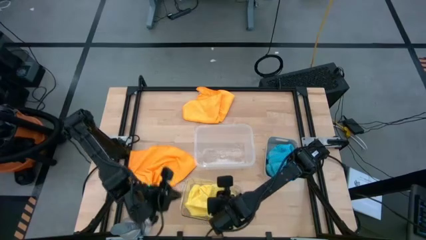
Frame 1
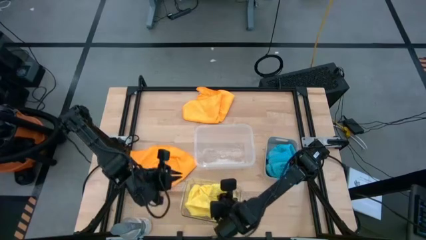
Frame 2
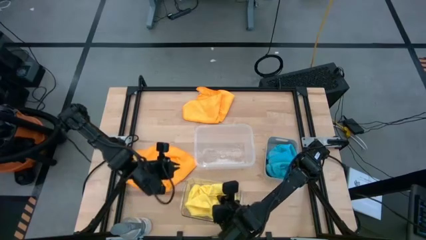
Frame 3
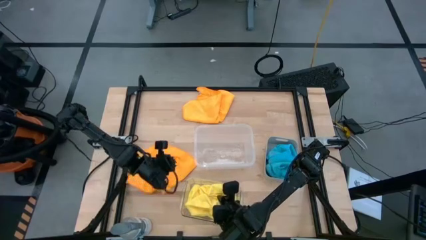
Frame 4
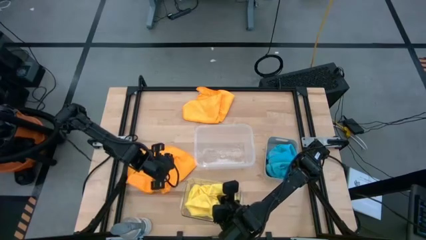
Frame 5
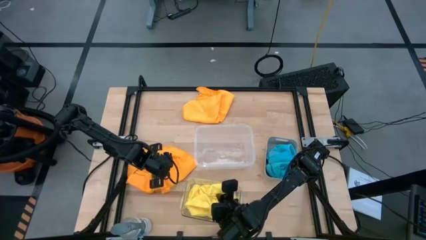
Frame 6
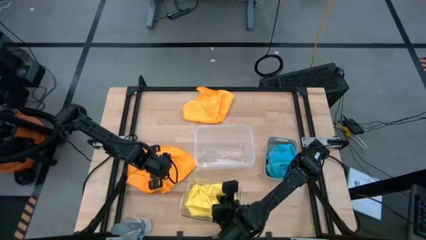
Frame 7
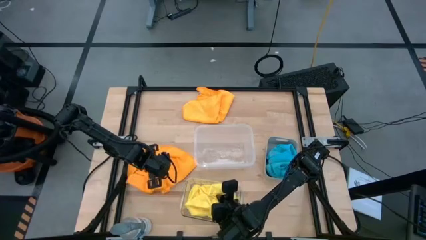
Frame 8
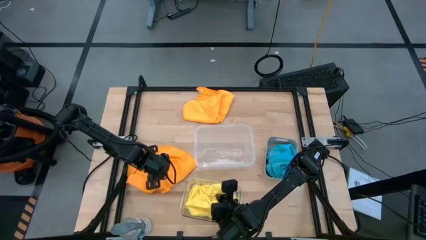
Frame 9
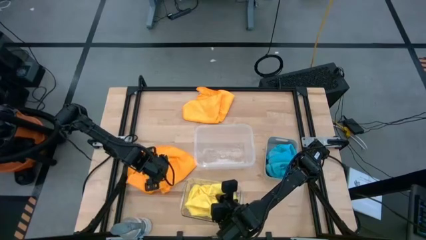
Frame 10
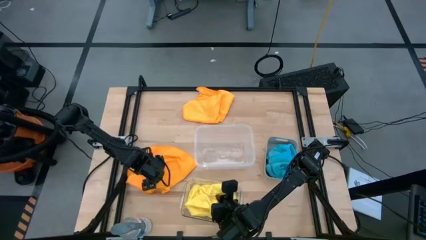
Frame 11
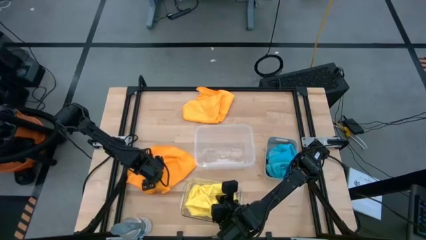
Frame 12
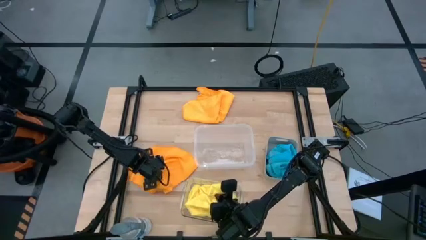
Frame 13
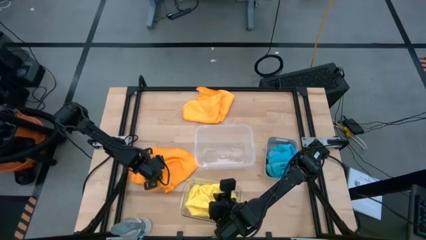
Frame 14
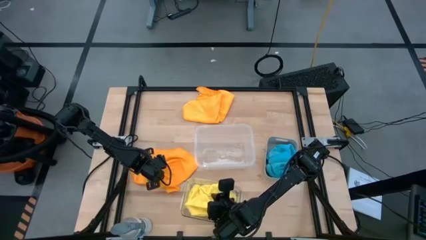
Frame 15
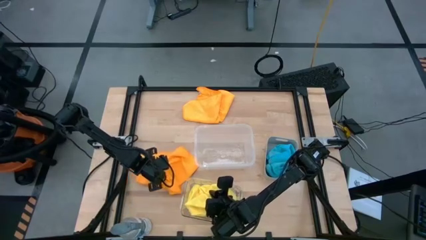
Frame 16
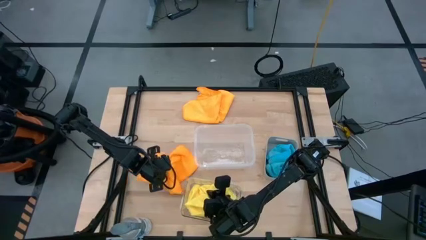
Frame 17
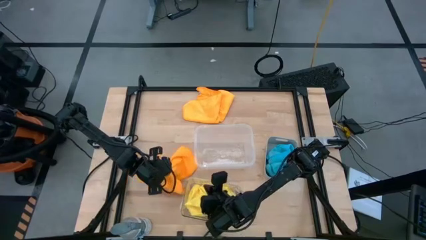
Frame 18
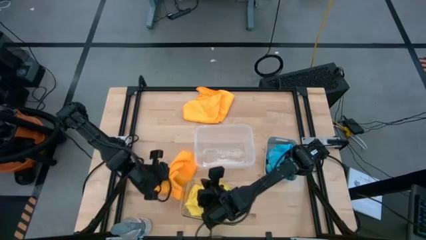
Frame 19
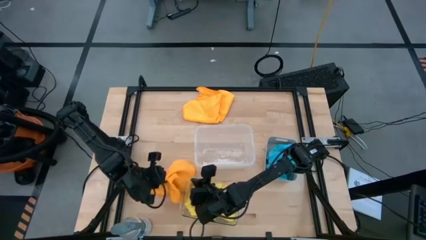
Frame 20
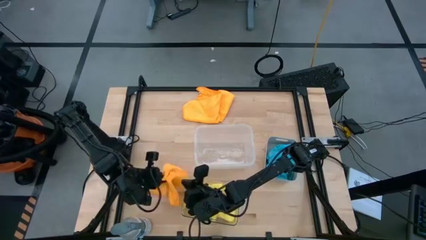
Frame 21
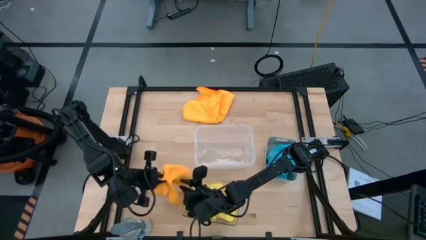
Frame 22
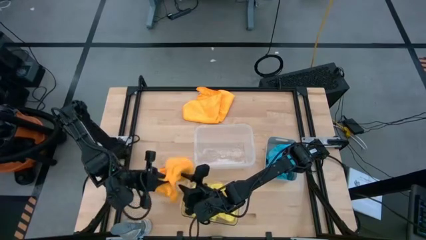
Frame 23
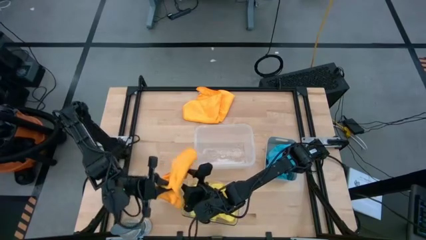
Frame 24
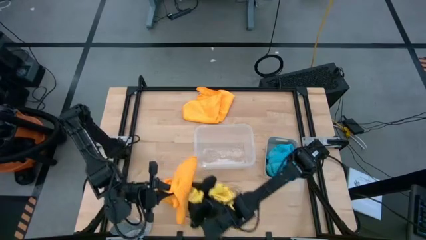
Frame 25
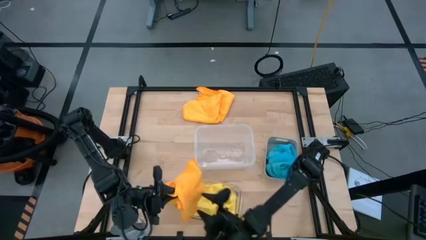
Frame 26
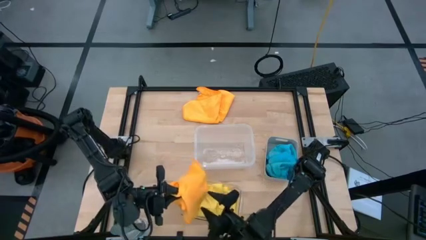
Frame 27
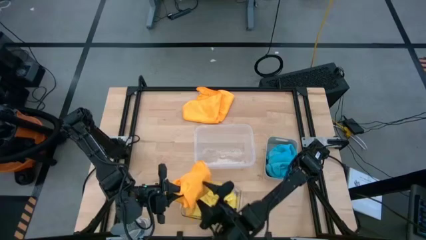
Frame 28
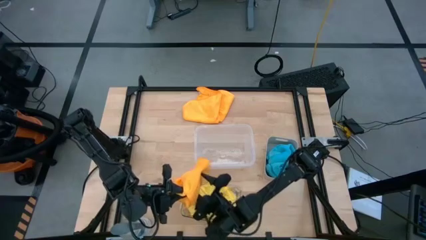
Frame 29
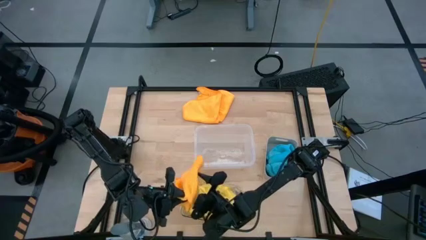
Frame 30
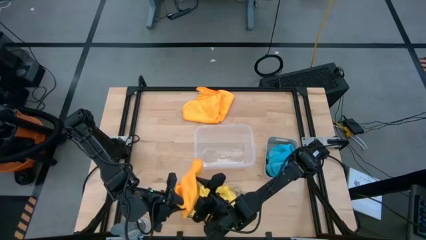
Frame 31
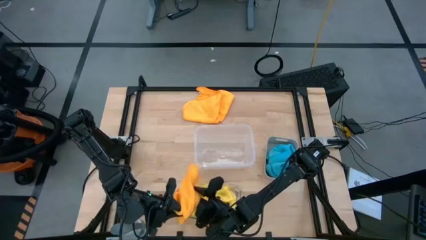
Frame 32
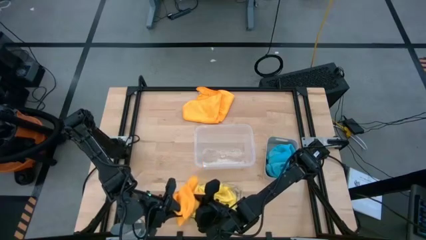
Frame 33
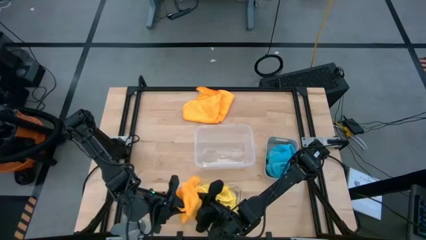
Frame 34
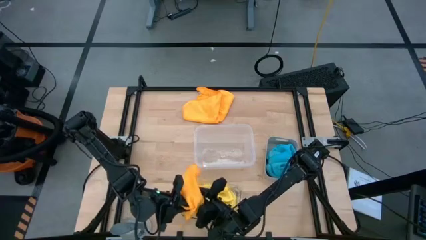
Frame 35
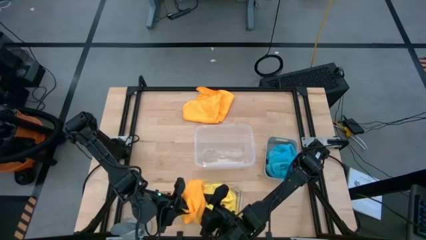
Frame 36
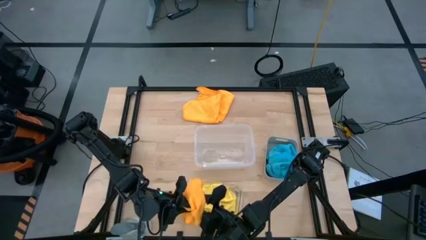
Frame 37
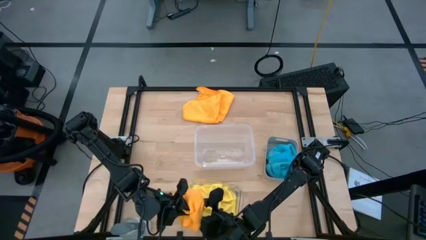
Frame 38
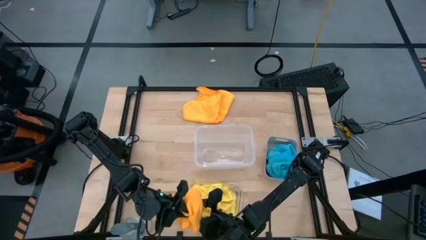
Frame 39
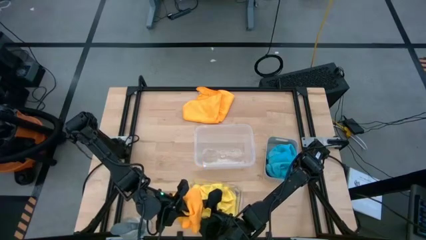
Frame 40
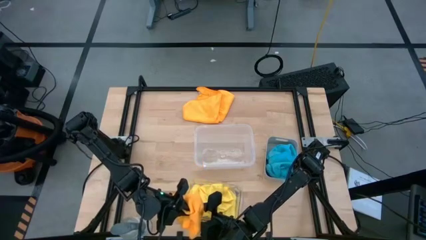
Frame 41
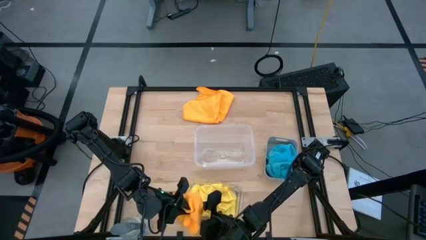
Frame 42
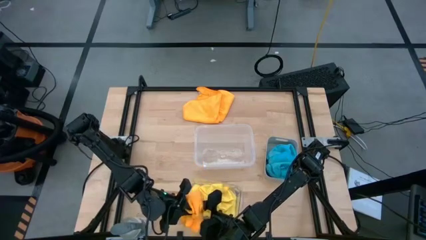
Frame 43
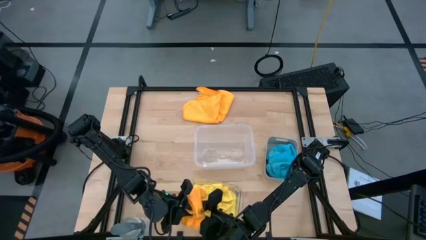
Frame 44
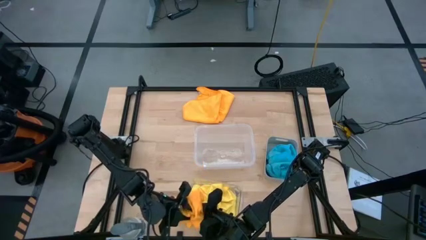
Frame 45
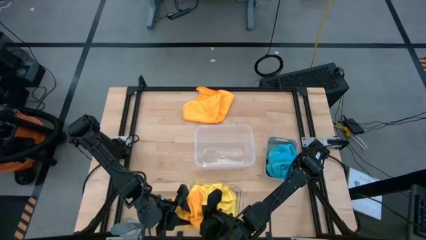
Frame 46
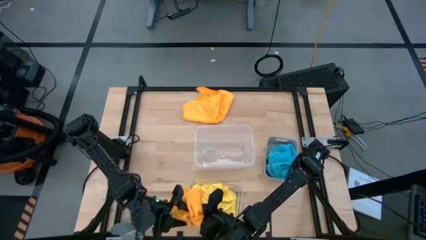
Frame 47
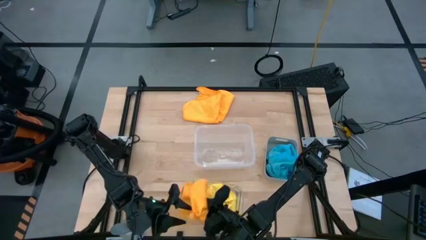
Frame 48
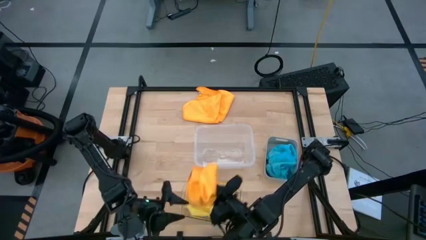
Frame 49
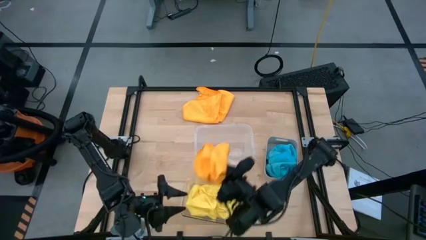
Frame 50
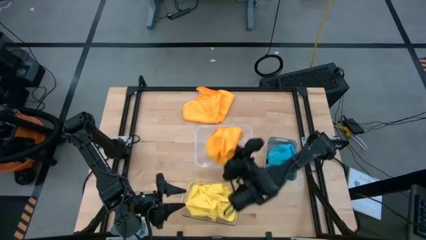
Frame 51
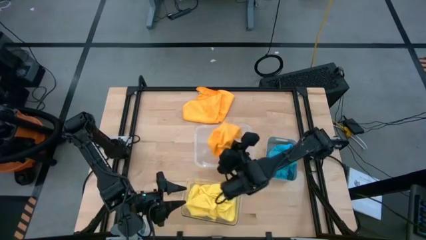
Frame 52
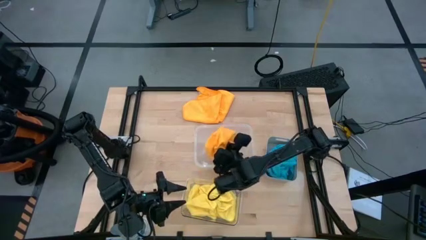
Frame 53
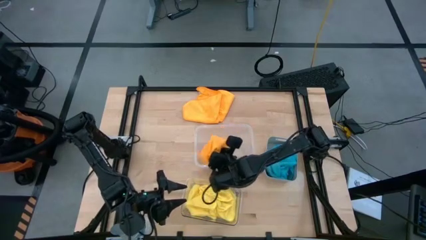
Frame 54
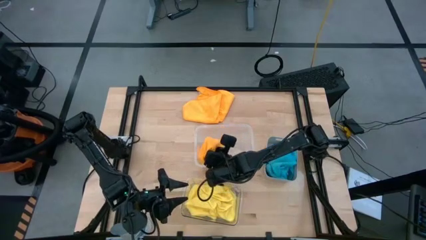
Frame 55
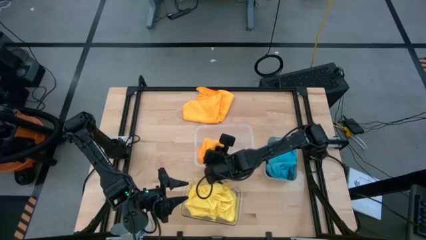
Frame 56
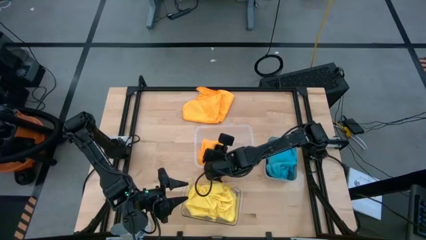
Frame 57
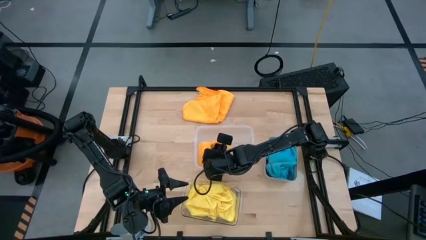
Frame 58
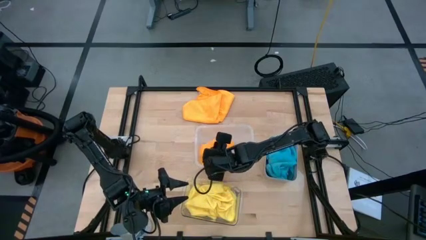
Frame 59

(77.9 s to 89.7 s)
Task: Sort microfiber towel by color & place in baskets
Put the bottom orange microfiber cloth into the white transparent bin

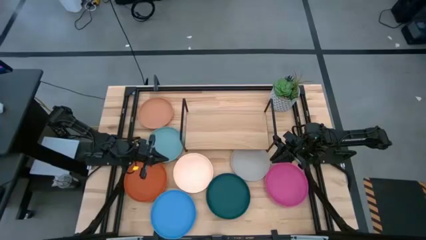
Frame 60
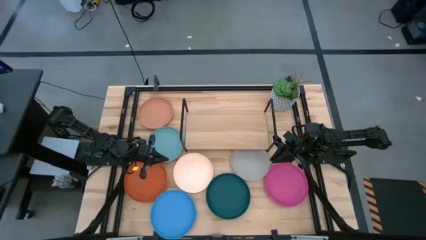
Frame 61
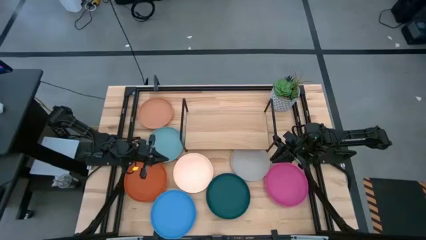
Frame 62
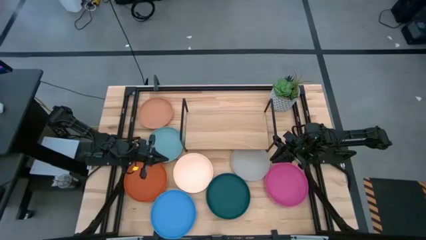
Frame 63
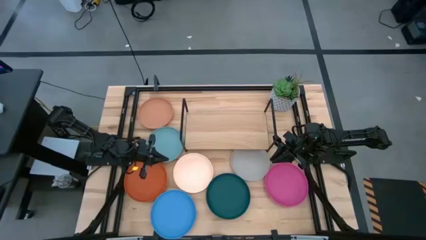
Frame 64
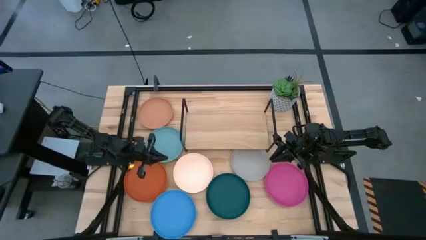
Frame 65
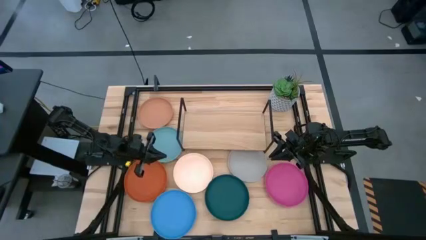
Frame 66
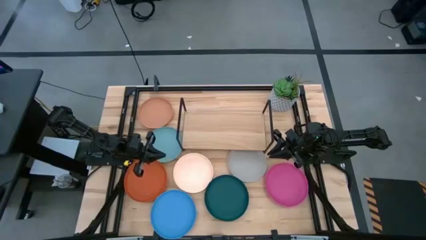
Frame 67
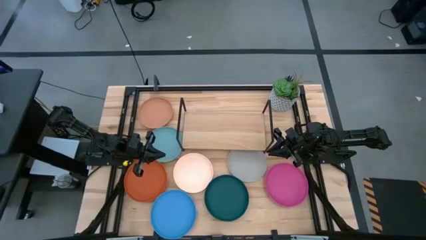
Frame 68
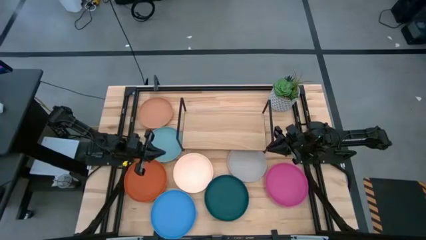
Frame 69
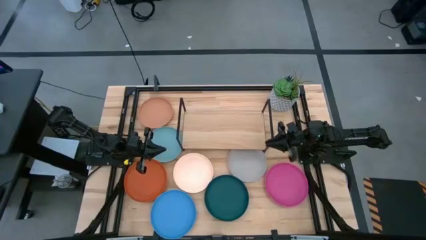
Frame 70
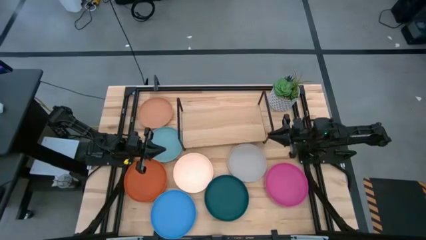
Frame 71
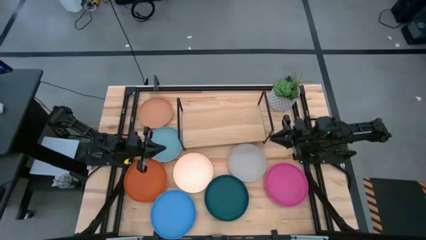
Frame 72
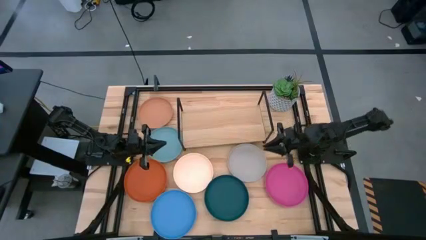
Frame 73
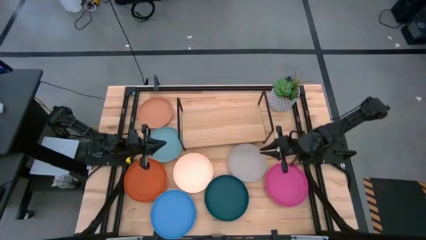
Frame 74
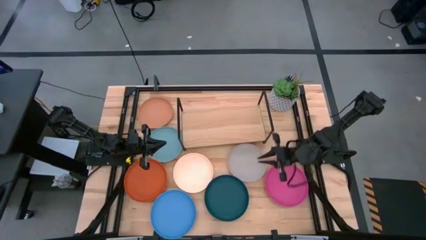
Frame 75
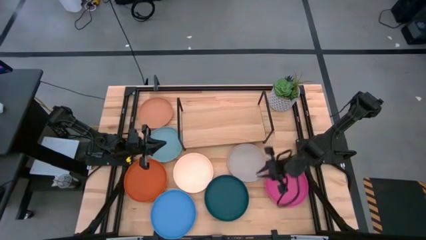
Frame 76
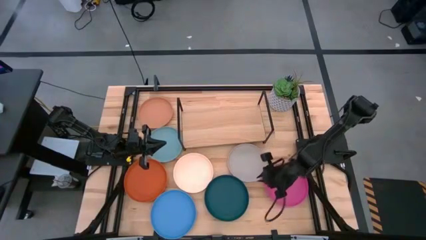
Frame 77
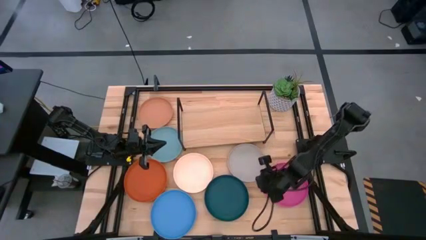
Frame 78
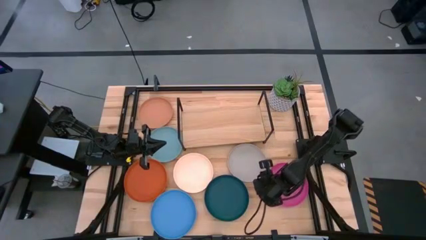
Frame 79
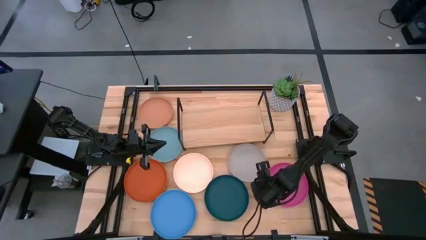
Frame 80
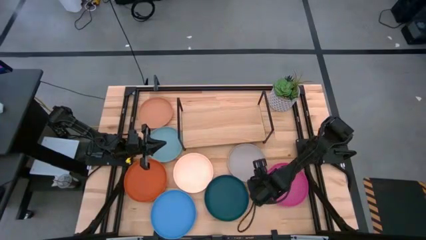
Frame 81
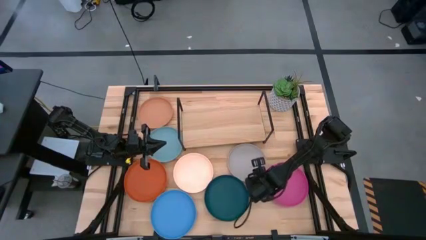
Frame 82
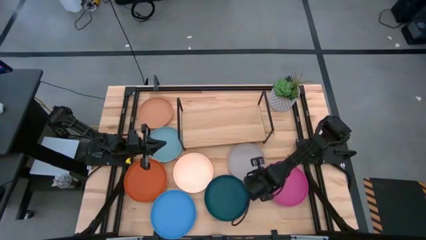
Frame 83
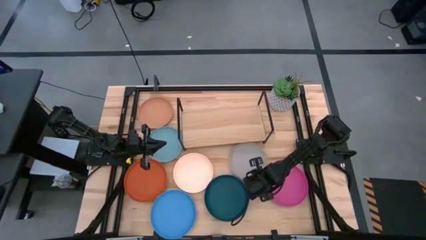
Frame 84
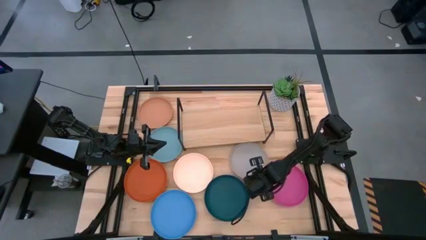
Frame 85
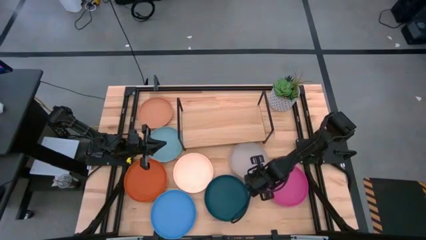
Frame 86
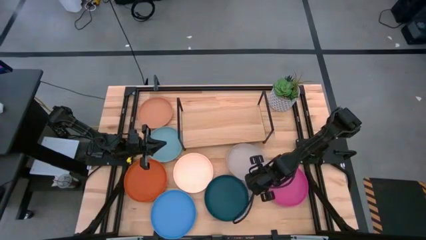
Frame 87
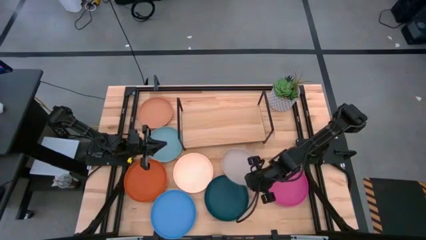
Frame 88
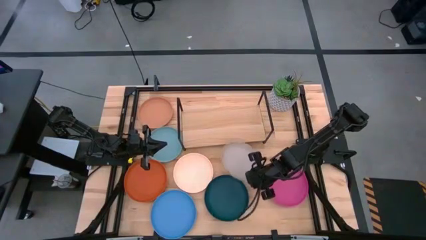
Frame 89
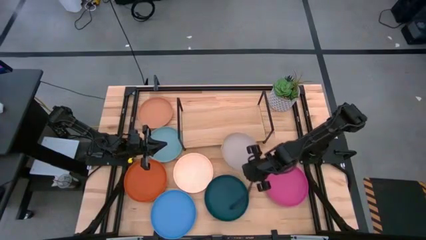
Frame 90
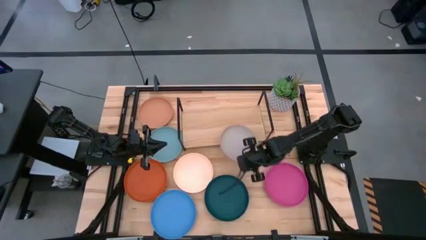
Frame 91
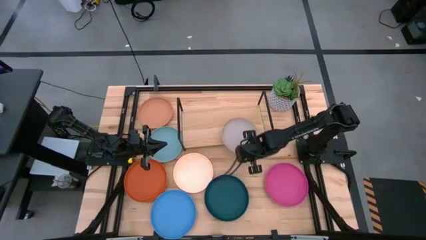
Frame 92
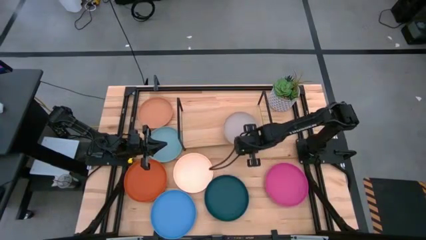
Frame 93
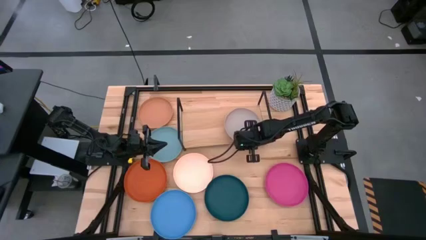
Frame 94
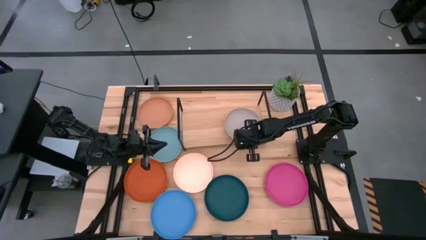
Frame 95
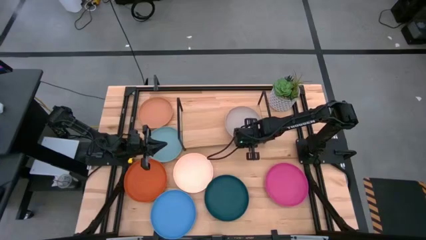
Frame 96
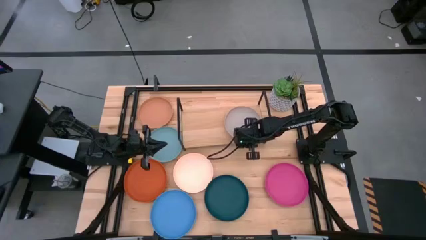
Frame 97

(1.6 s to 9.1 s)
Task: Place and stack plates onto a shelf
Put the gray plate on the shelf
